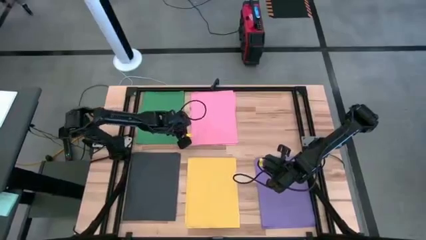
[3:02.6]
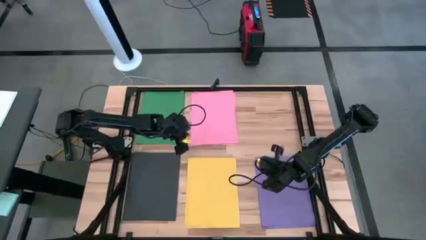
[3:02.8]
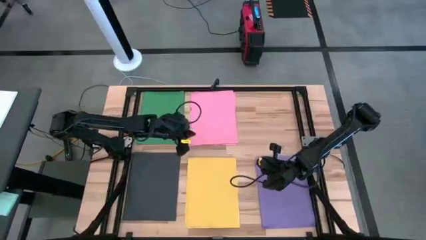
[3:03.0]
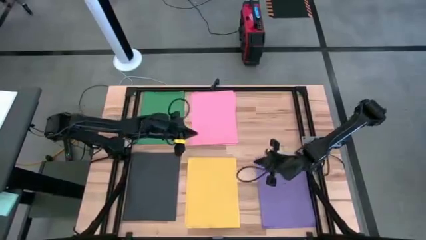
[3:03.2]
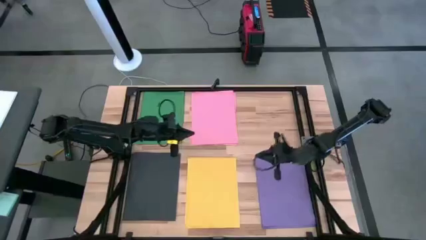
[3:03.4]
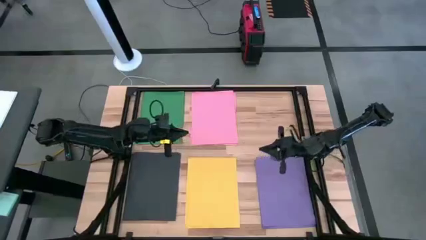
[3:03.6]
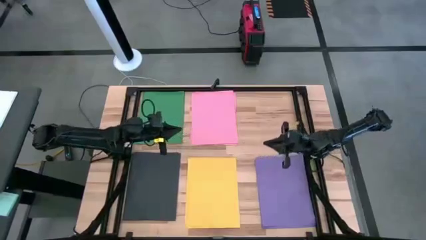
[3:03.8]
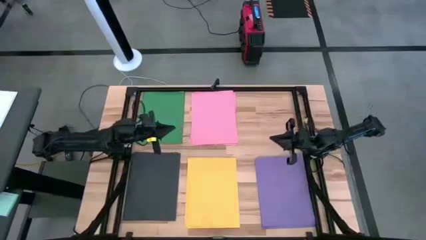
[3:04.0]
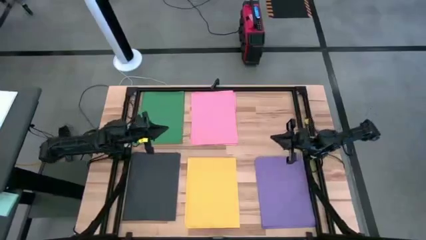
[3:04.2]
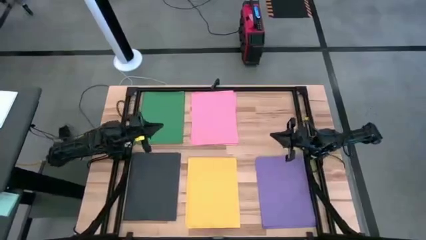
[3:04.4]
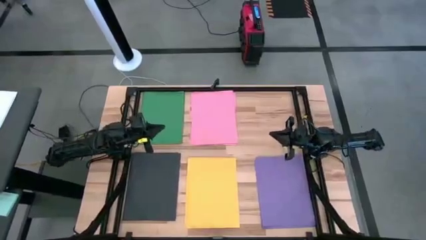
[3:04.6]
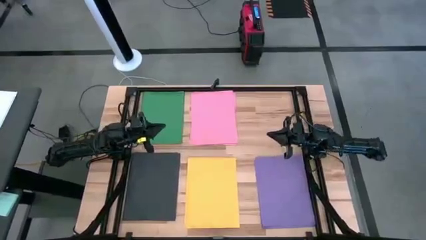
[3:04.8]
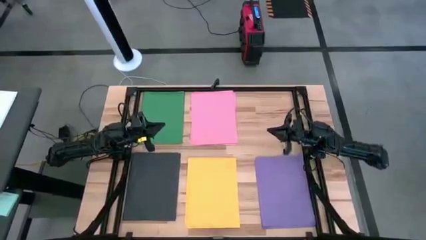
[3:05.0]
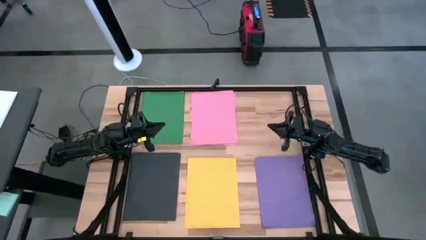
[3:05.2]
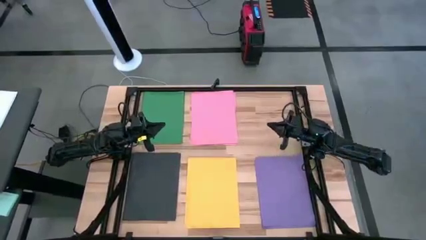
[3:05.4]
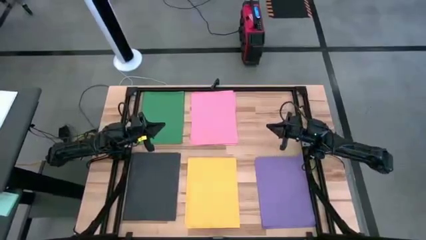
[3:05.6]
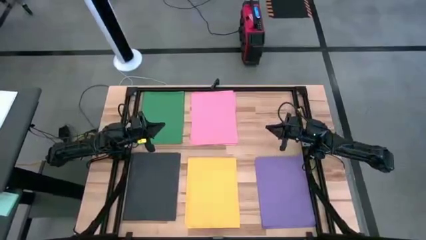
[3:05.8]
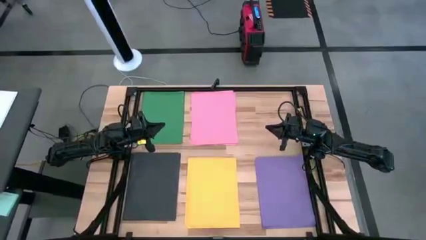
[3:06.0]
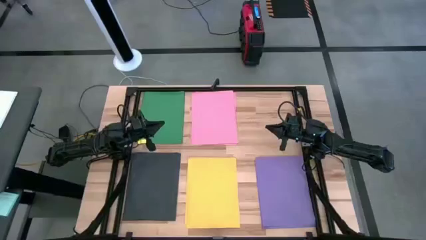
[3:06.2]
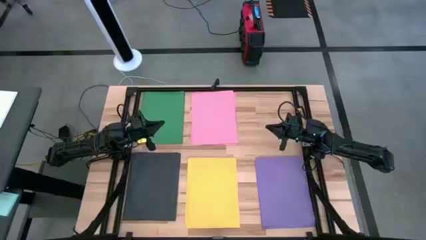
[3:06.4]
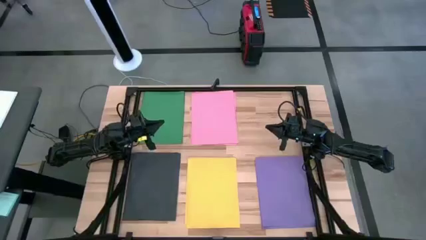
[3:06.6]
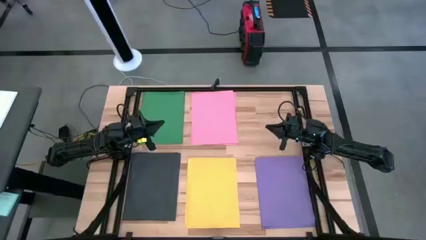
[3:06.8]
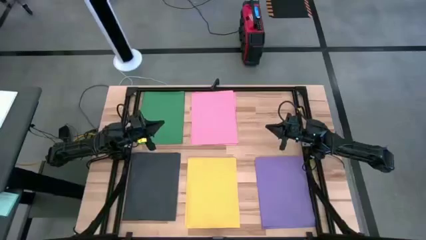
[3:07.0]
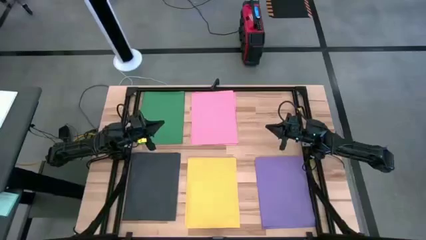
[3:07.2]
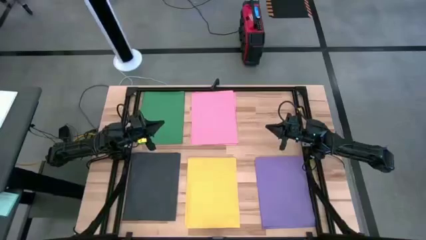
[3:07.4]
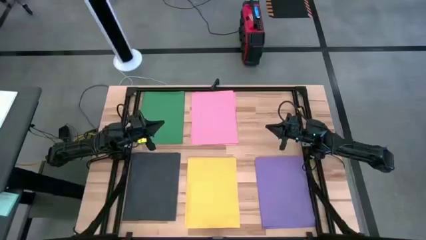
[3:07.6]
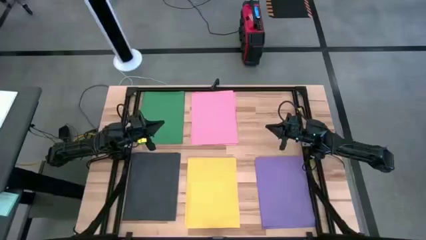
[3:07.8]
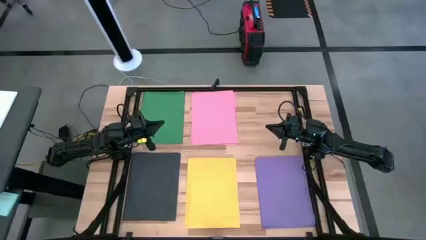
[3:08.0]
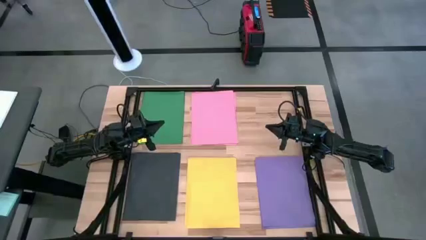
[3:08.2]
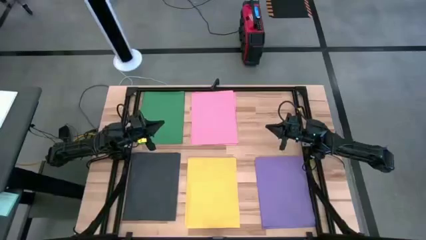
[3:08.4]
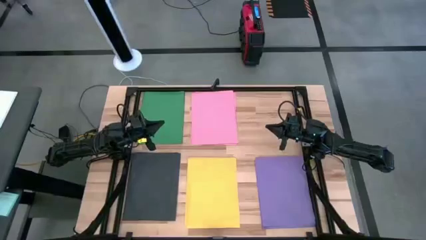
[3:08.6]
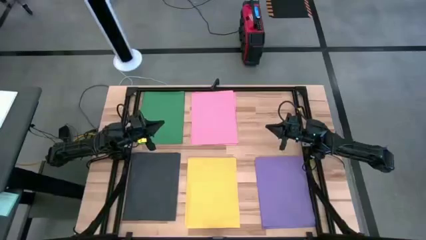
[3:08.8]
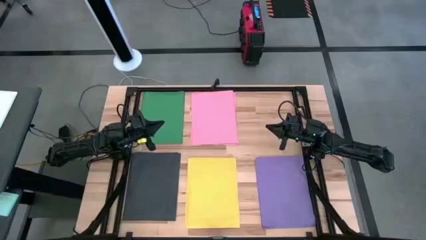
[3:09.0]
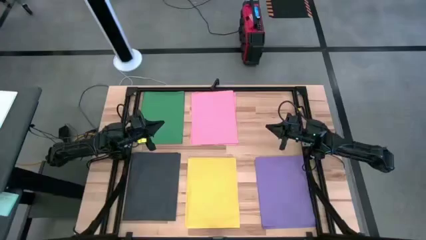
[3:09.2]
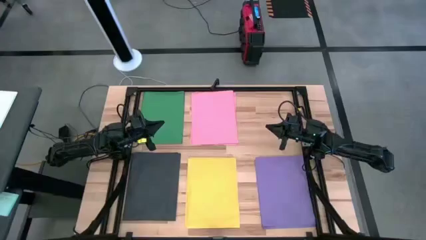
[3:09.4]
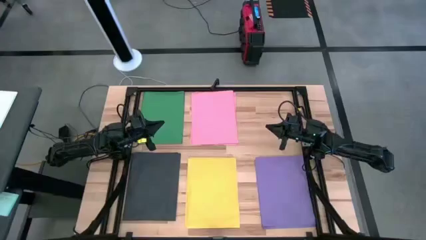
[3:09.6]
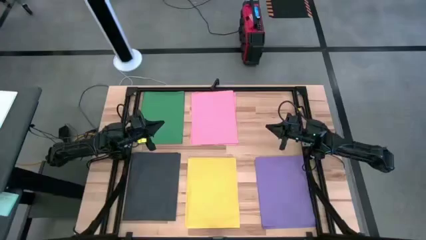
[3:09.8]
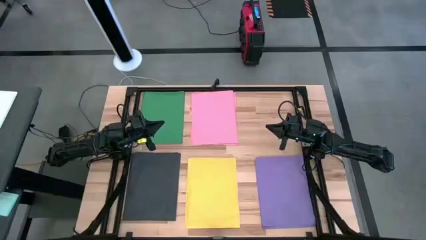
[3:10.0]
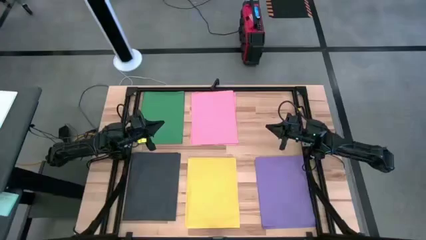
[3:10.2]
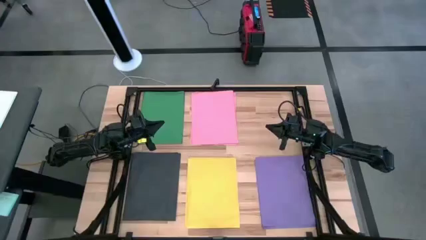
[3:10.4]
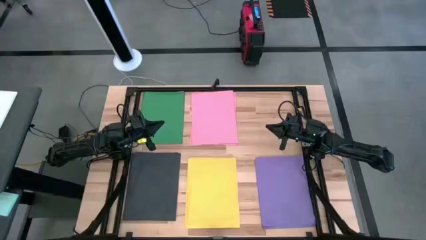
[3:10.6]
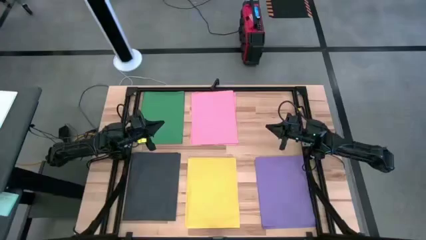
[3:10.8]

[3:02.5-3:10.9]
Task: Organize paper
Return to Home Position

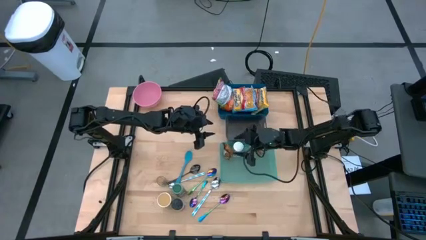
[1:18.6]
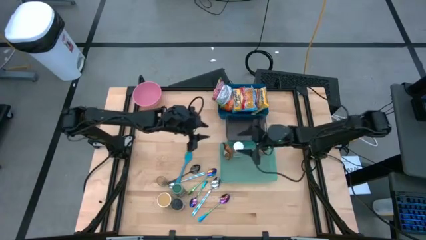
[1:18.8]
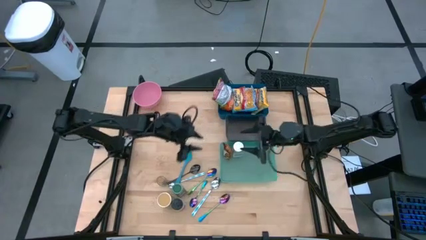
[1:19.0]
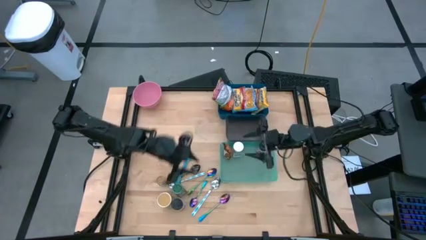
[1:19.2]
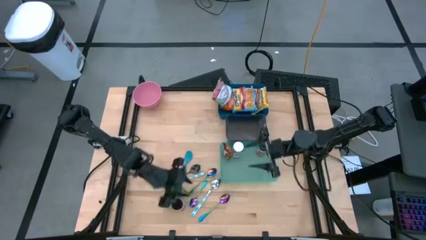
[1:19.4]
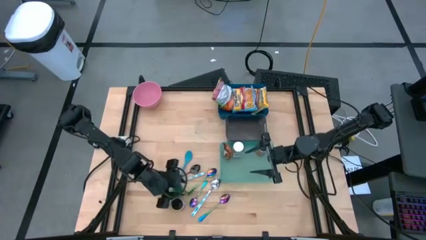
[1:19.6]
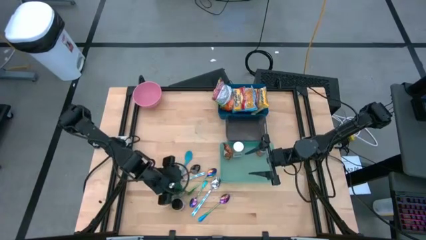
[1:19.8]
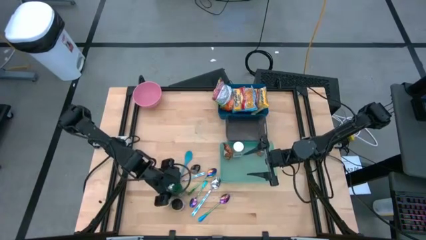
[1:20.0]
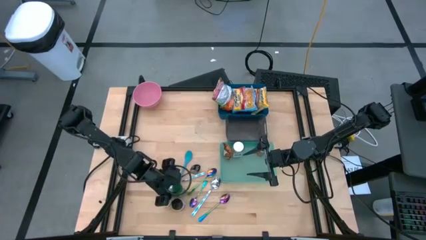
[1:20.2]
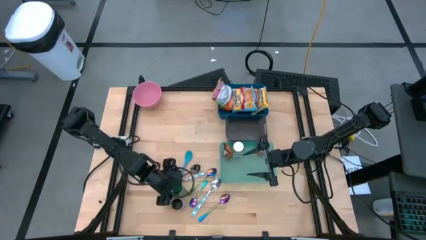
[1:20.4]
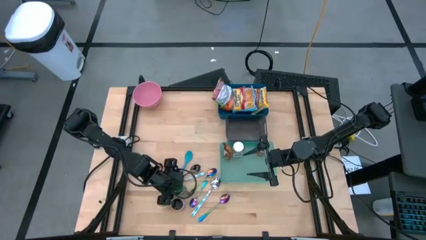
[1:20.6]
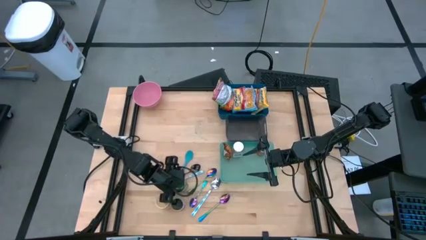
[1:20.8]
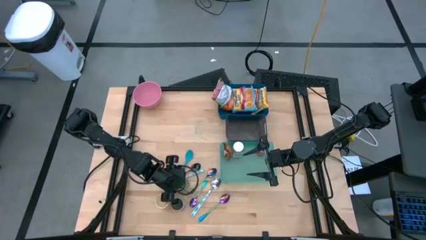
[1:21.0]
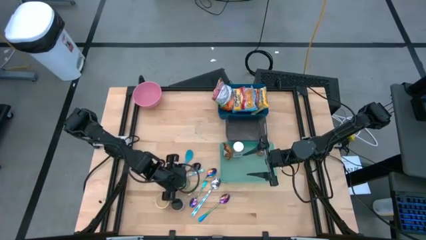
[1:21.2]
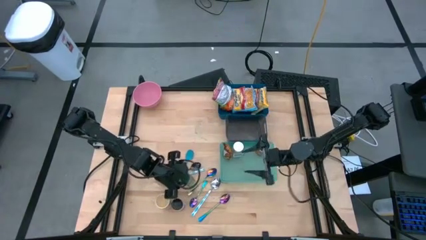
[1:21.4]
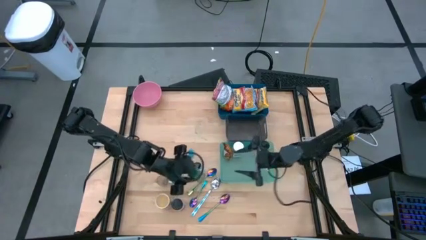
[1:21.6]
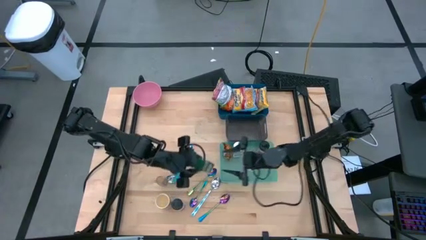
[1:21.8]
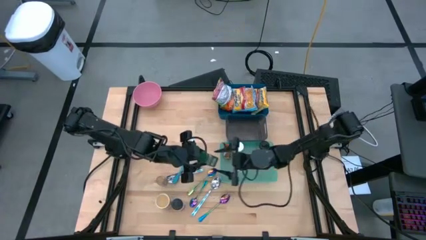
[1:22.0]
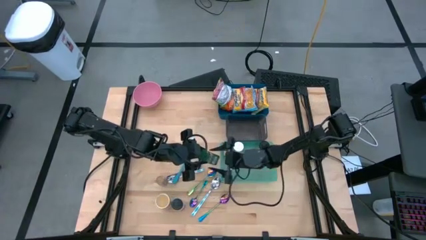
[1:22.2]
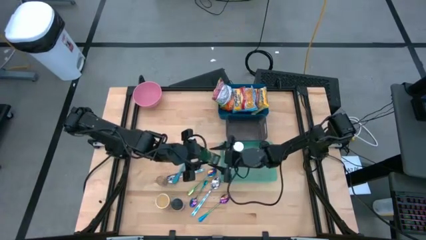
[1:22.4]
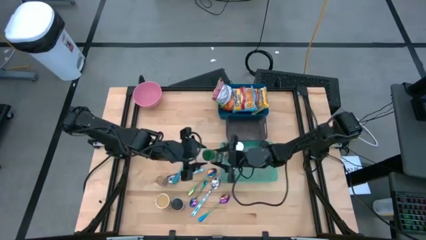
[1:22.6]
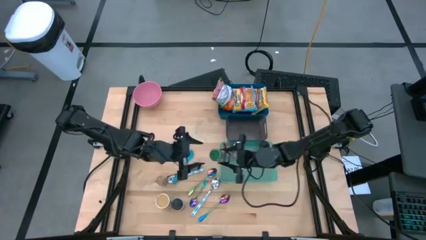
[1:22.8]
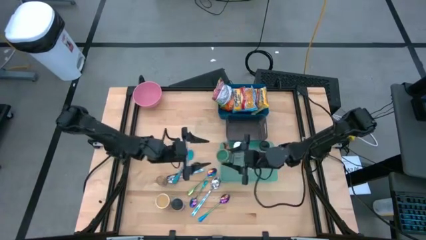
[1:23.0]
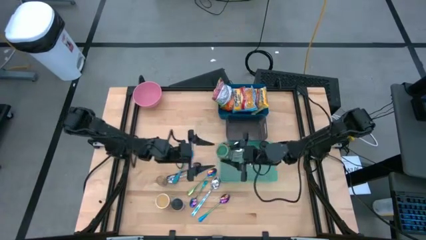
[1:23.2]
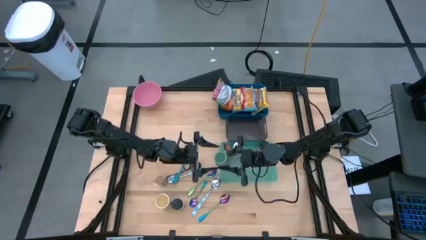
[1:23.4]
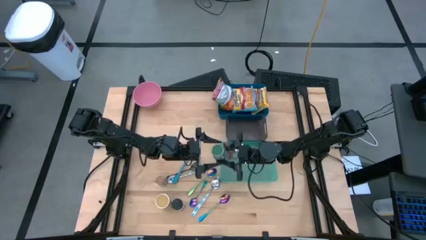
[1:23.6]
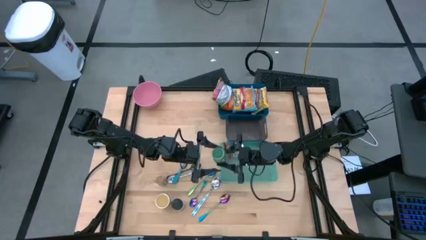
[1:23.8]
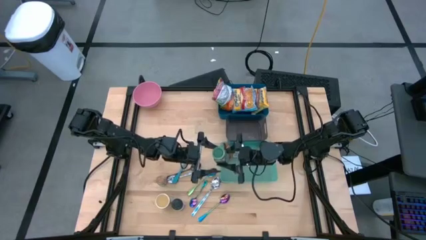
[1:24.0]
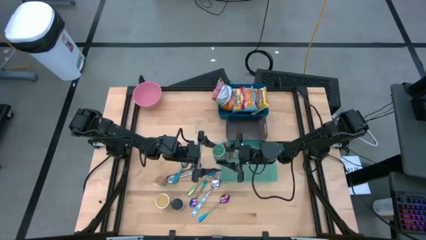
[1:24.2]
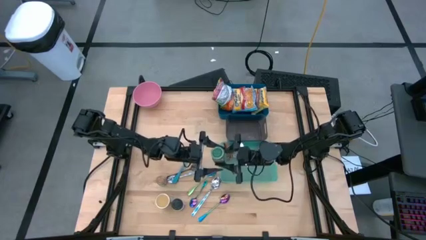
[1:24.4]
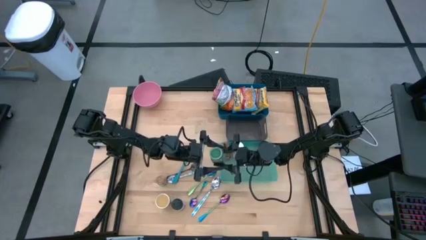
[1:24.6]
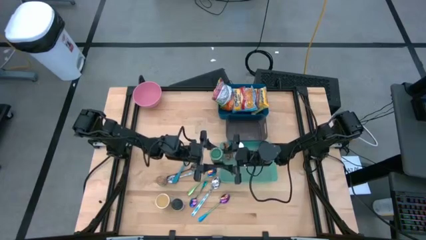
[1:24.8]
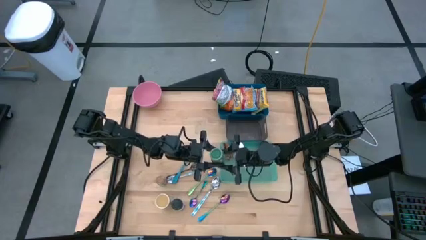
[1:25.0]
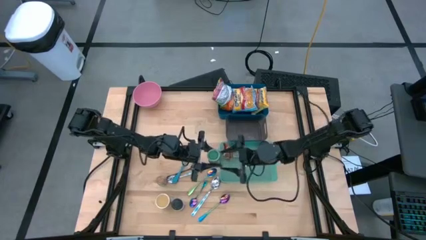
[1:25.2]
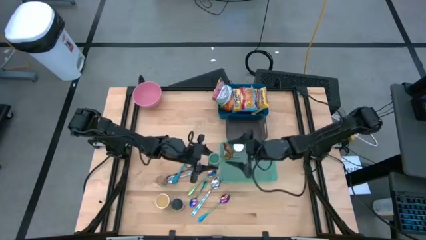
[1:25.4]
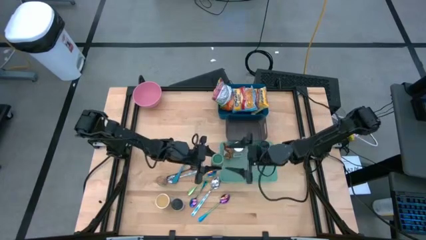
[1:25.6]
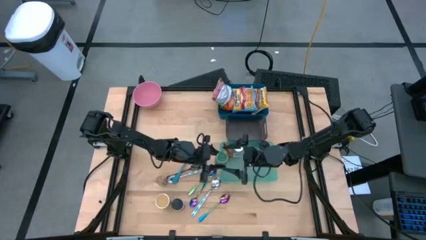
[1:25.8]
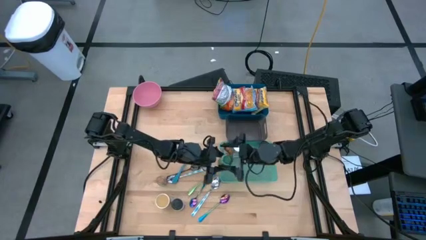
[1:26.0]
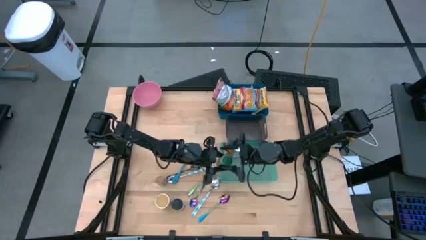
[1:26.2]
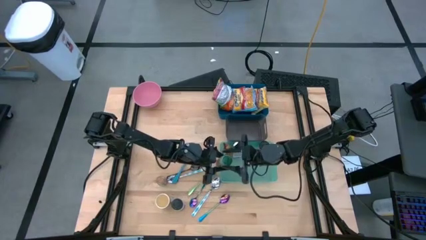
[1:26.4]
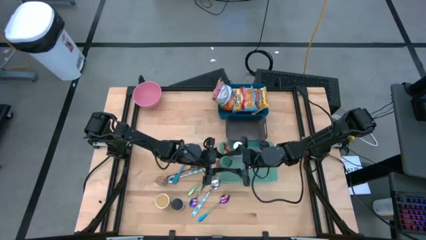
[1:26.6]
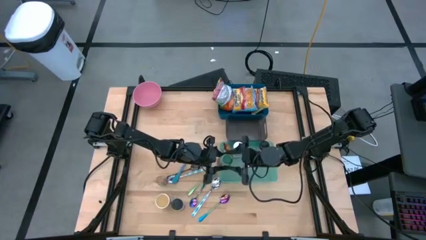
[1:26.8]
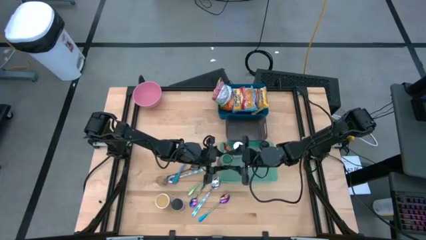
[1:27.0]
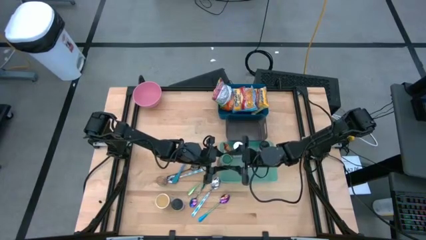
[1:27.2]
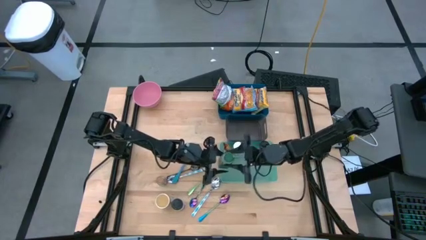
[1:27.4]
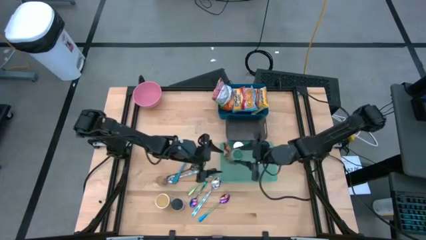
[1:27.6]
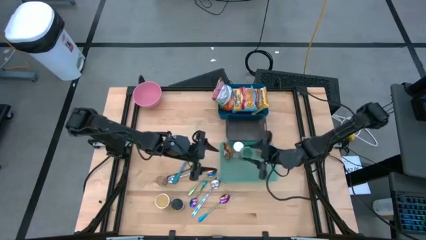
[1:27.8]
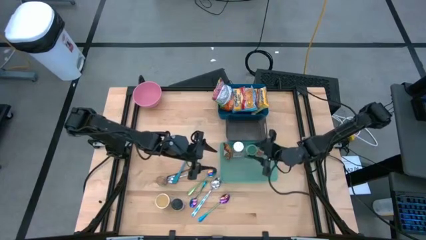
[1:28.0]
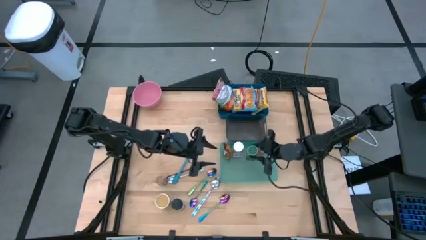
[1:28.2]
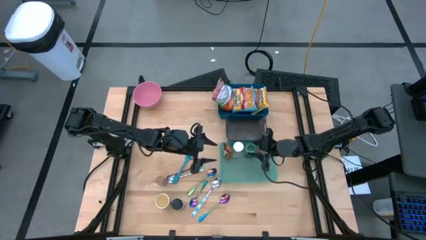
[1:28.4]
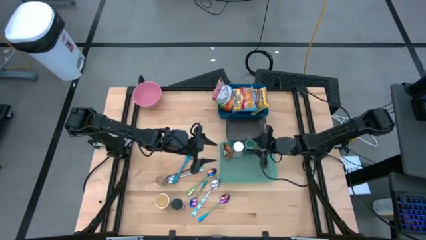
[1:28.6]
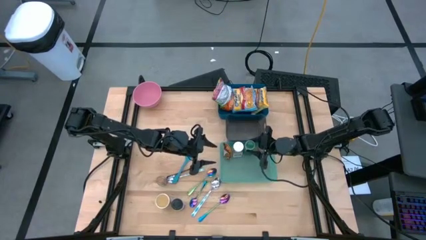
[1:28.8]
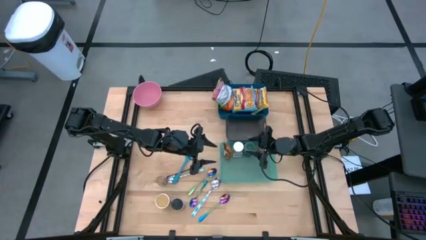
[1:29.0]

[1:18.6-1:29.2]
Task: Pick & Place Food Item
Put the green seasoning bottle into the green bin
